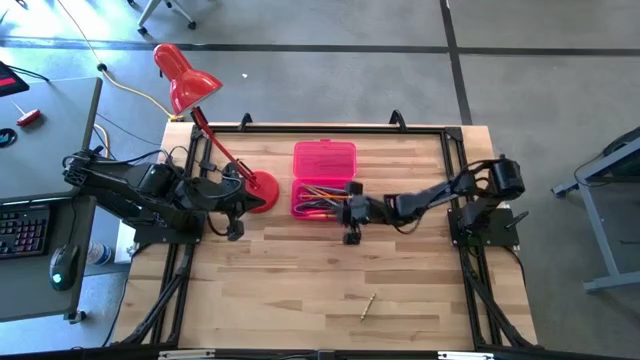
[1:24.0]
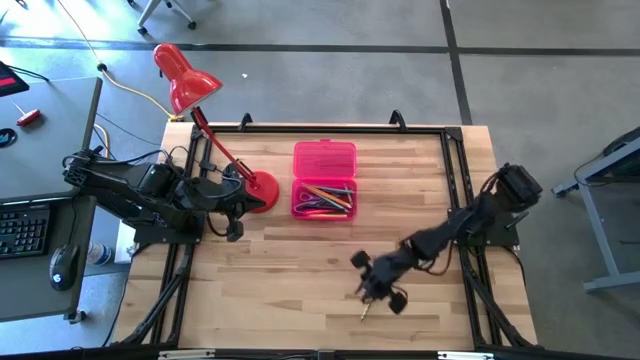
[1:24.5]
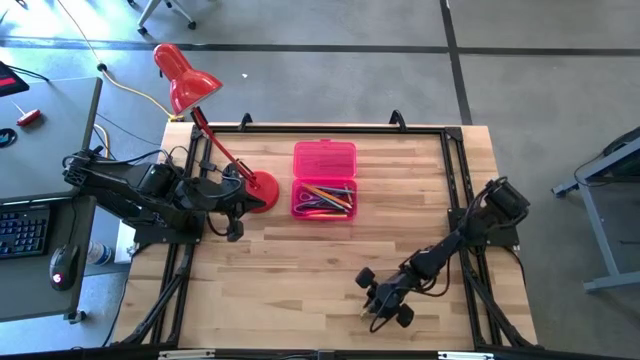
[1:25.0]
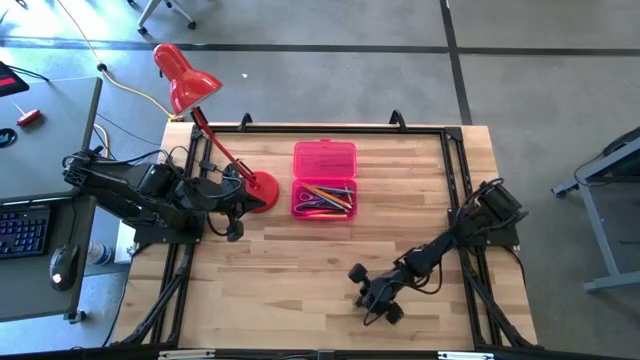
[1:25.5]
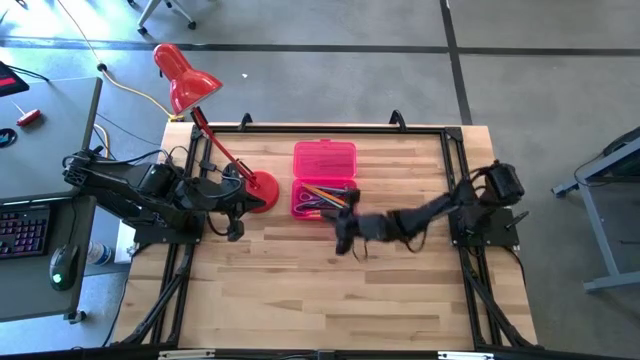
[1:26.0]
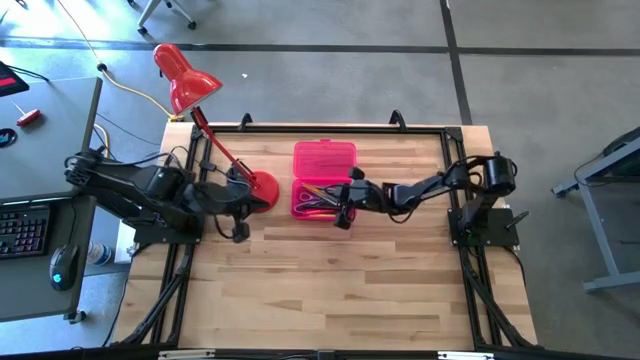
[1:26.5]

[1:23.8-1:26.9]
Task: Pick & place school supplies into a supply box
Put the yellow crayon into the pink supply box

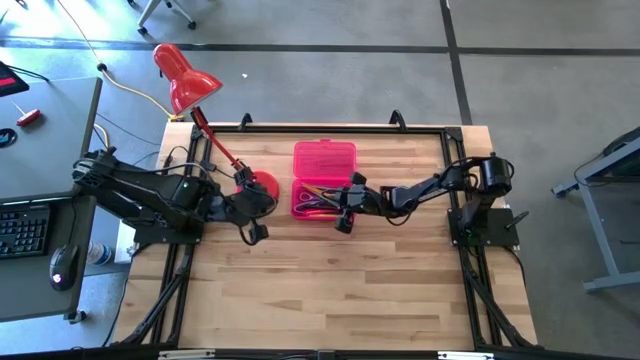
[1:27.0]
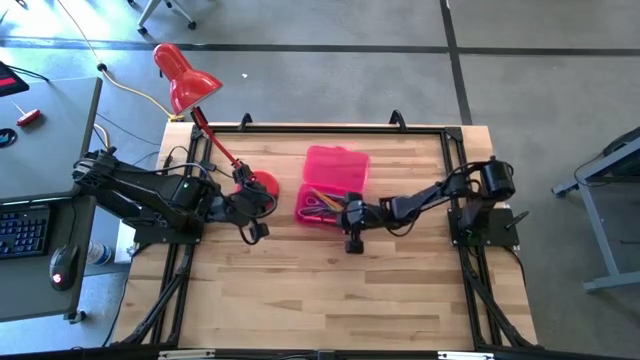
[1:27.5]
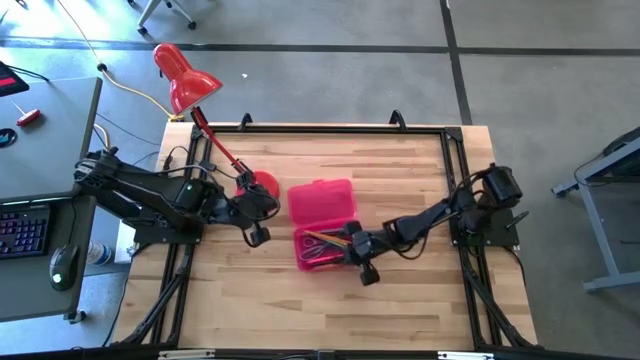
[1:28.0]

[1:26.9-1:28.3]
Move the pink supply box to the center of the table

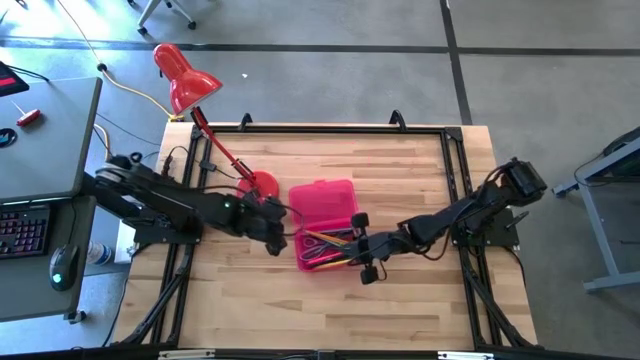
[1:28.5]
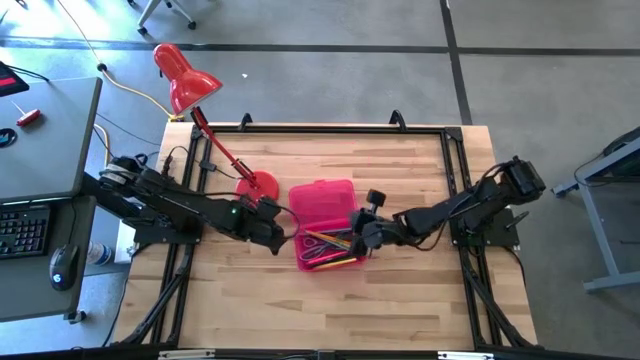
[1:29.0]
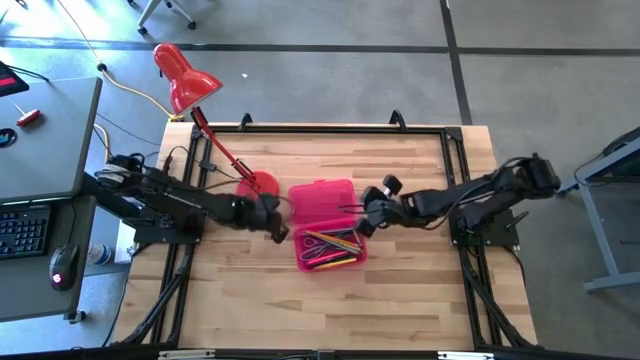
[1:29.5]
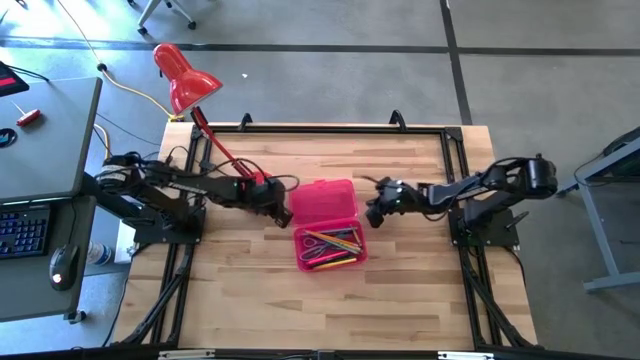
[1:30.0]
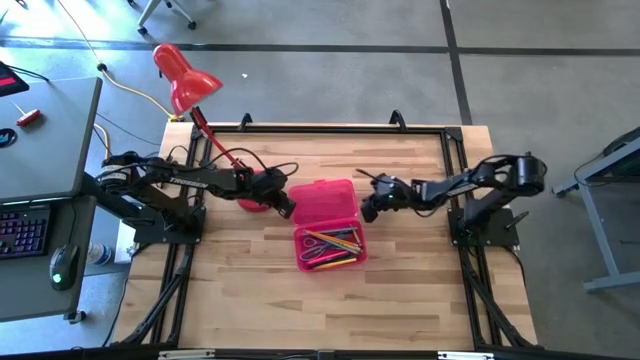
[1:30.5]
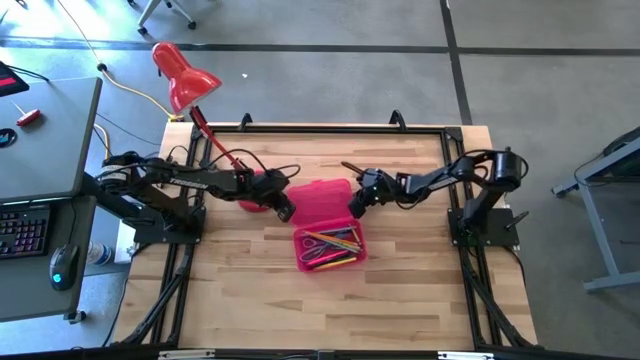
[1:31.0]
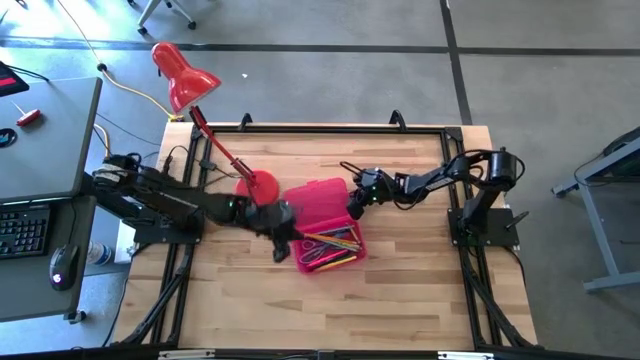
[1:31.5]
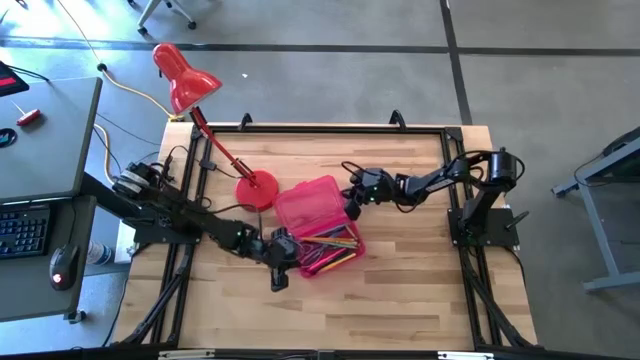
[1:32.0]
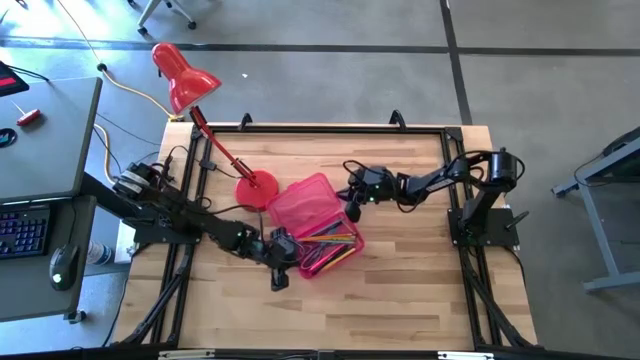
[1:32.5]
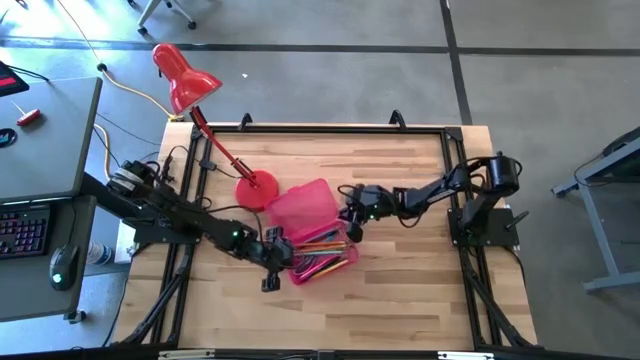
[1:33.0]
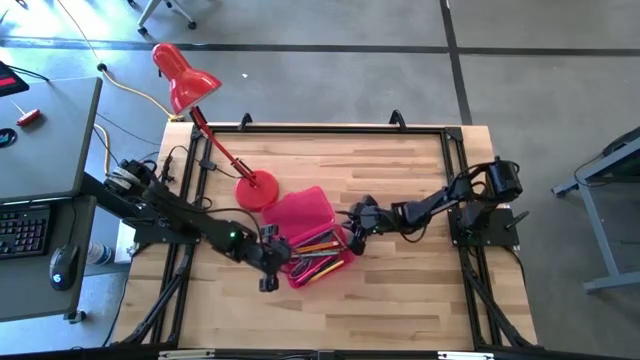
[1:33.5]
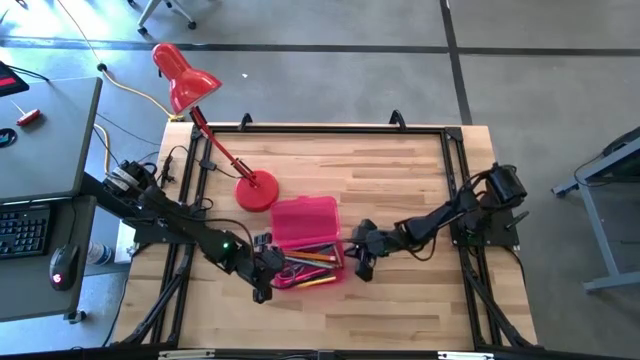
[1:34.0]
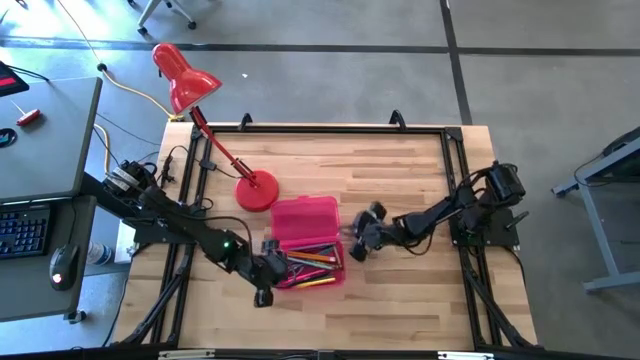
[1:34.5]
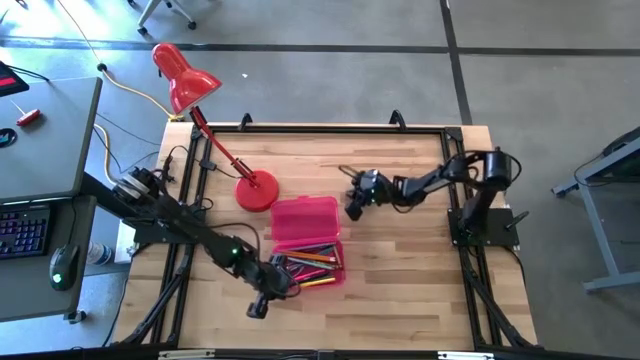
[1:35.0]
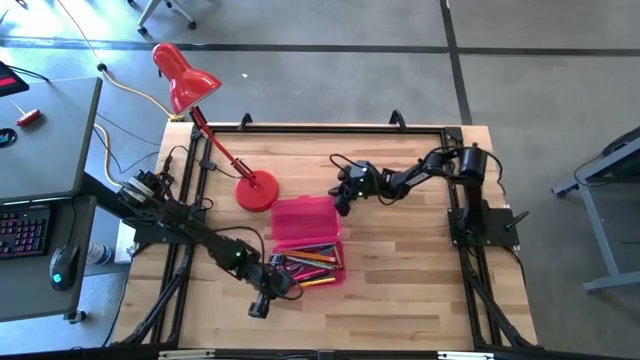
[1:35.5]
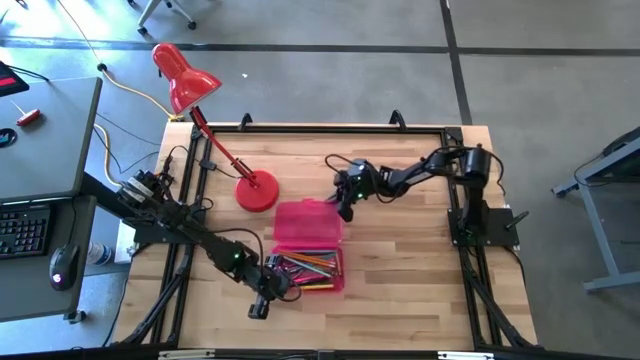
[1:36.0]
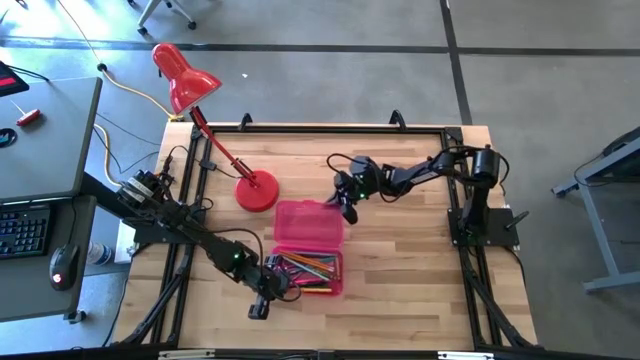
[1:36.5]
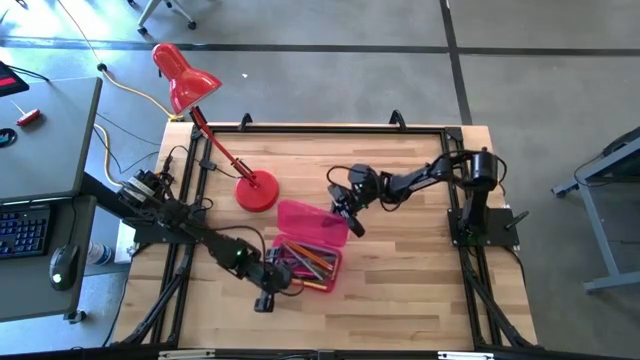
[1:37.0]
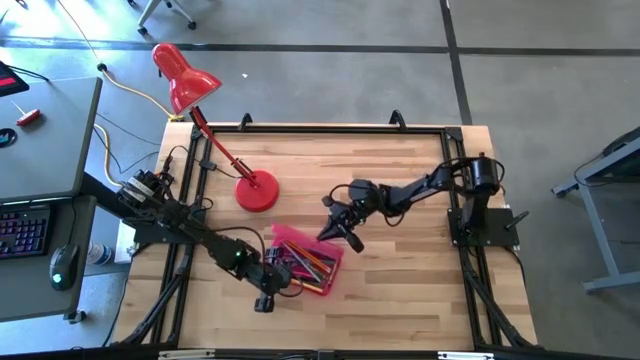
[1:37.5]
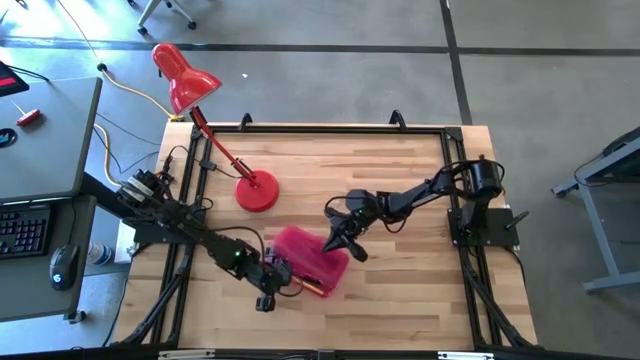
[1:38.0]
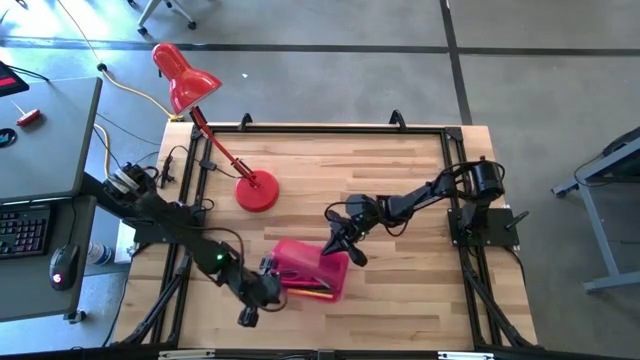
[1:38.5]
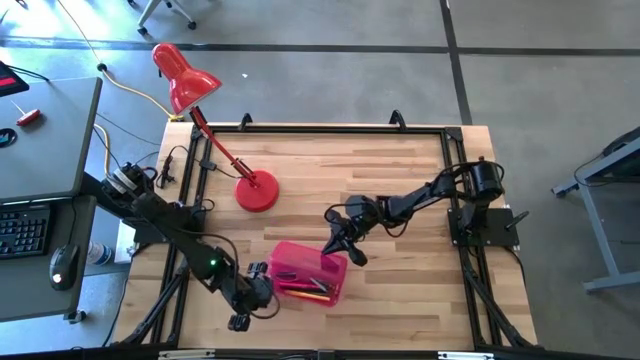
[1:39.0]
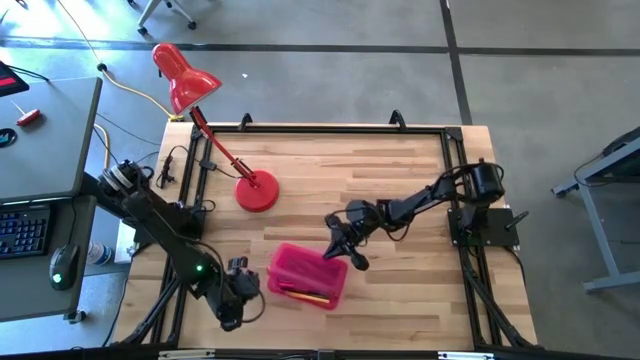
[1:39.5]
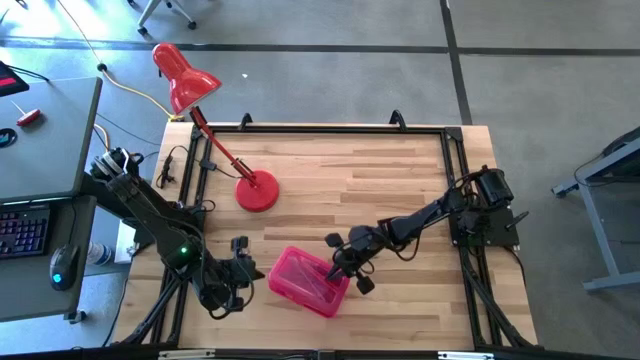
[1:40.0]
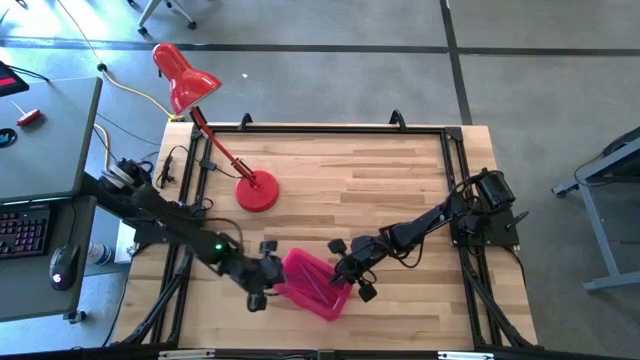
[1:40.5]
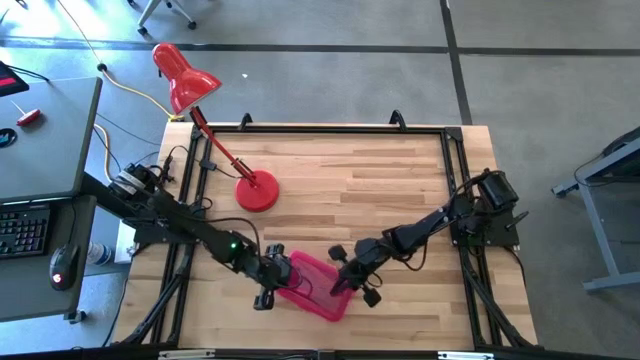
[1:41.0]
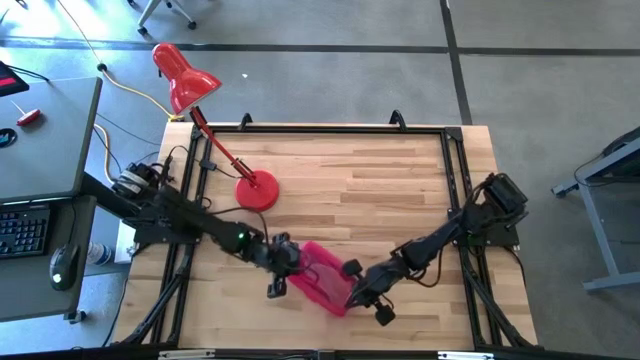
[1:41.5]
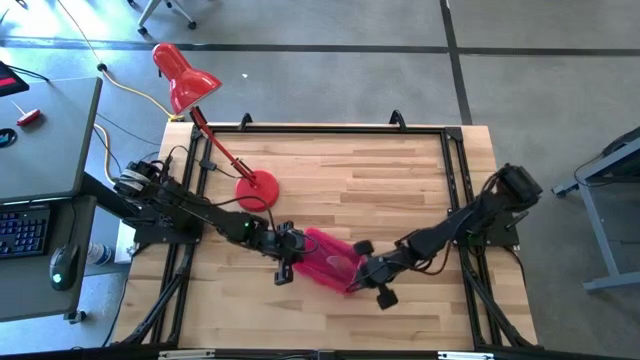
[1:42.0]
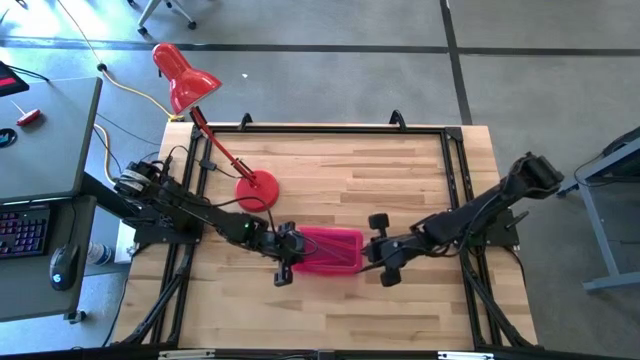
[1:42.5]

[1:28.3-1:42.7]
Close the pink supply box

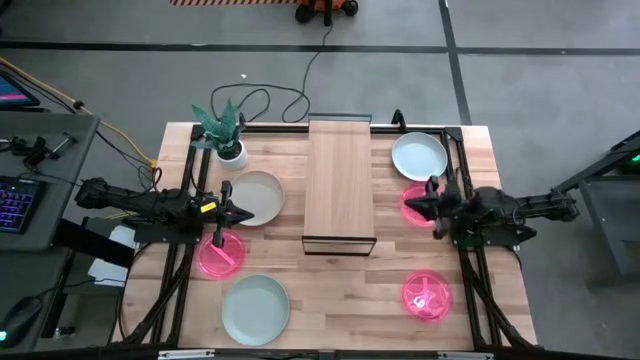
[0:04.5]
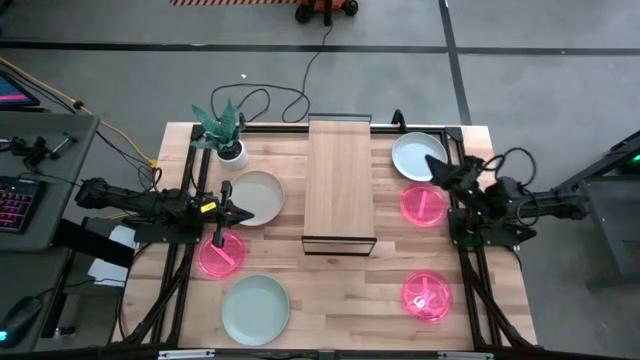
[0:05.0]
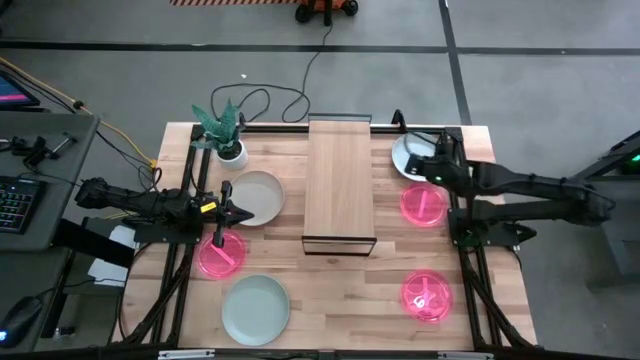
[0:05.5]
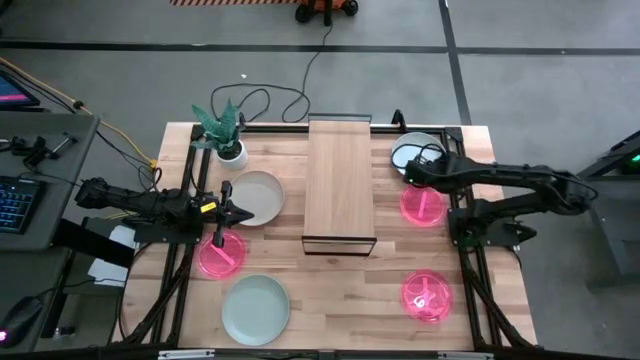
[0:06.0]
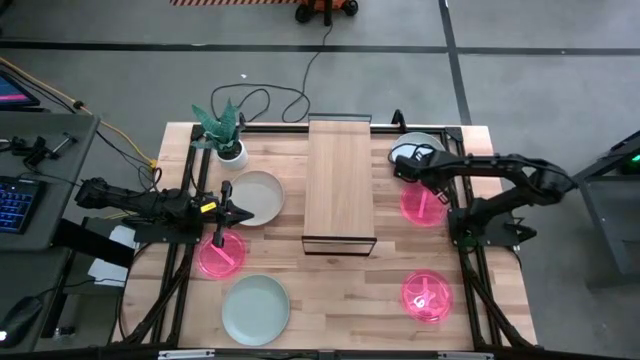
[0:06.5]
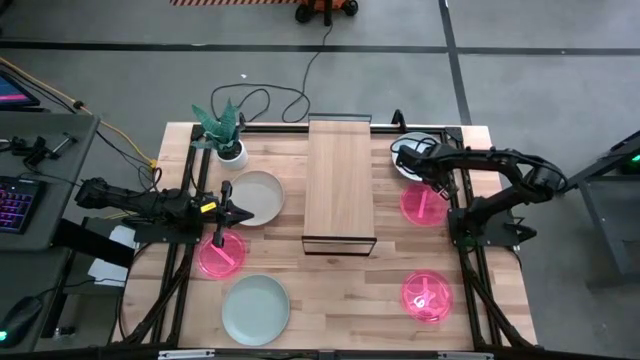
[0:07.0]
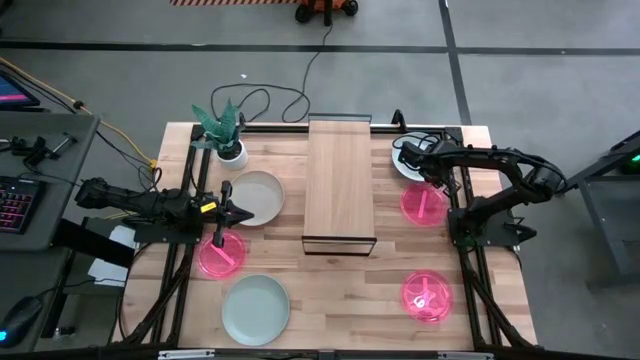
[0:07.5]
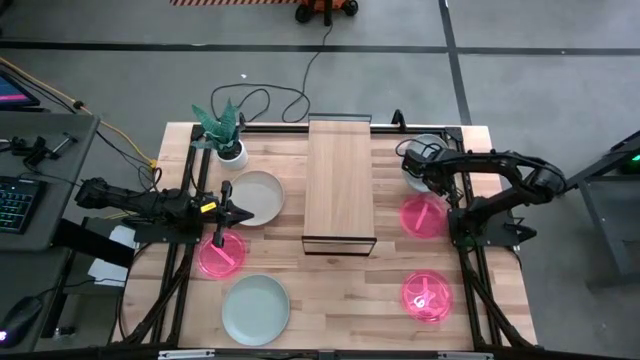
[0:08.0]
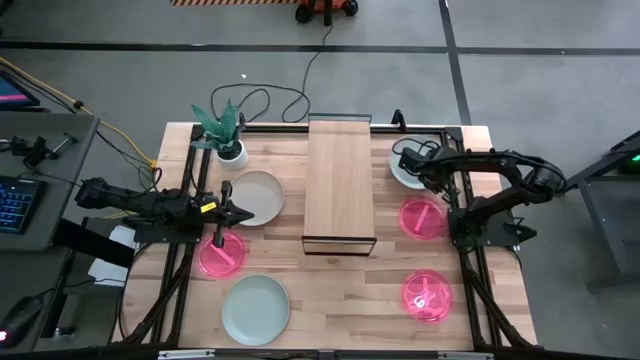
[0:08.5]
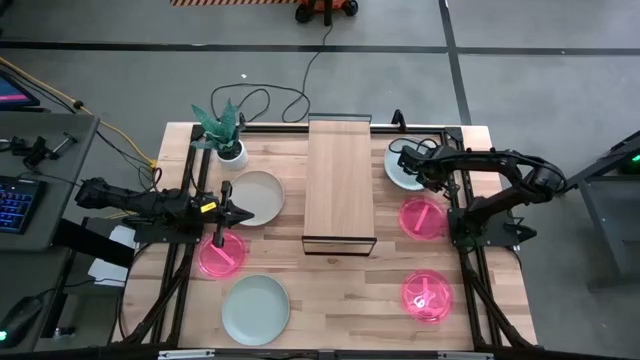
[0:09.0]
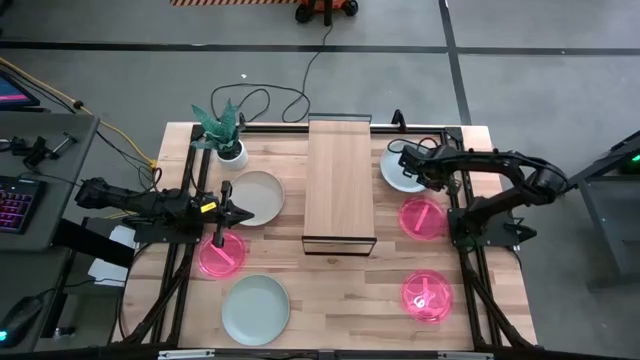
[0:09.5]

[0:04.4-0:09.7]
Task: Place and stack plates onto a shelf
Put the top white plate on the shelf
